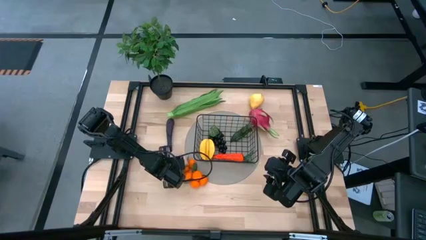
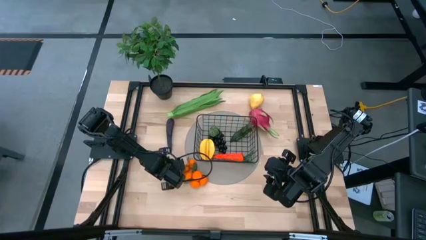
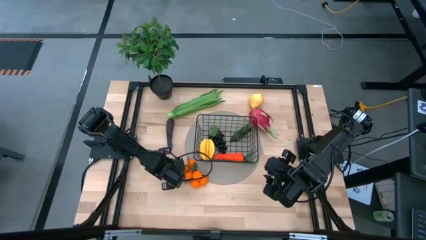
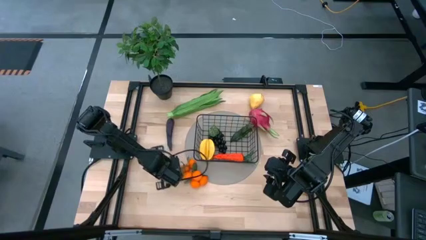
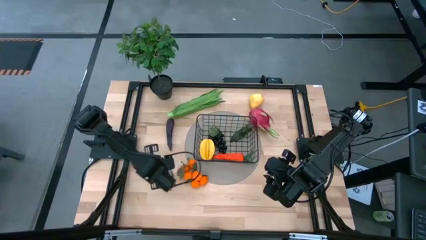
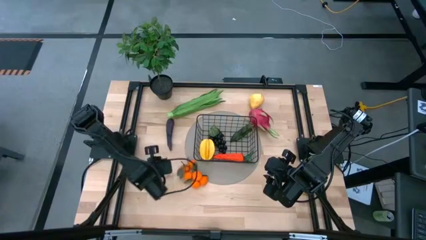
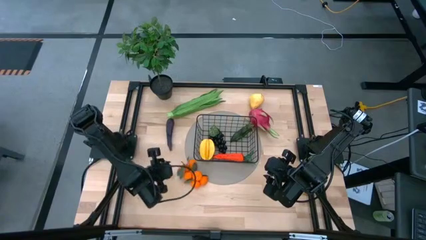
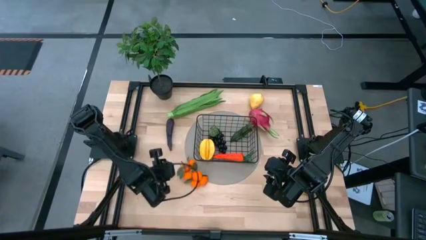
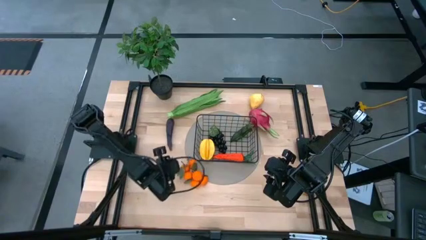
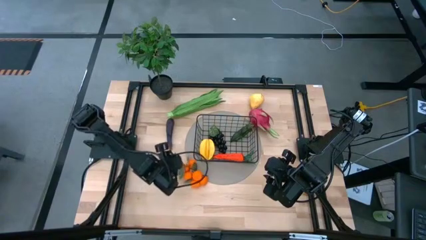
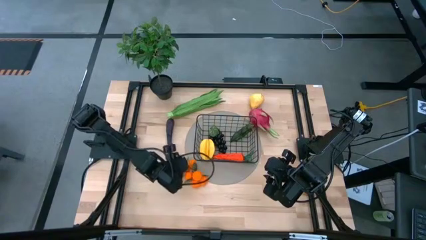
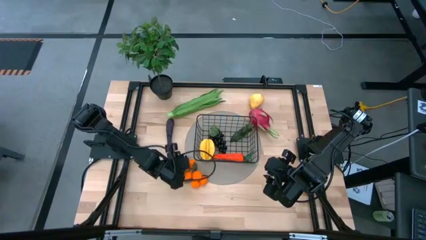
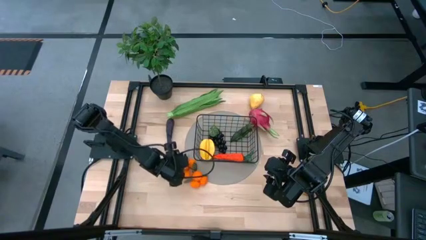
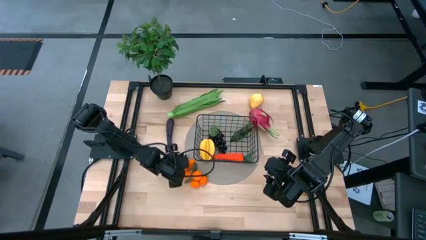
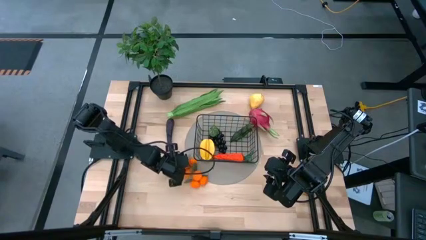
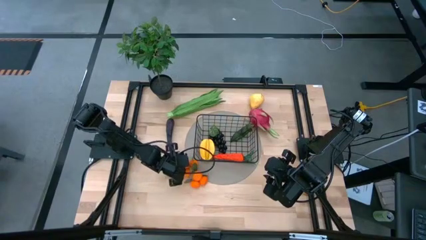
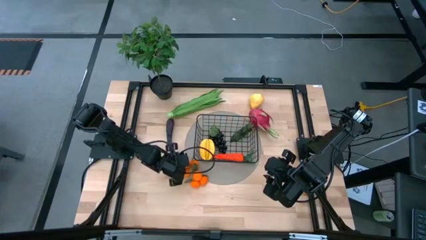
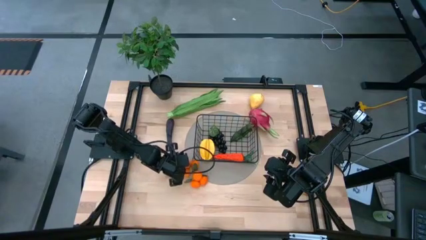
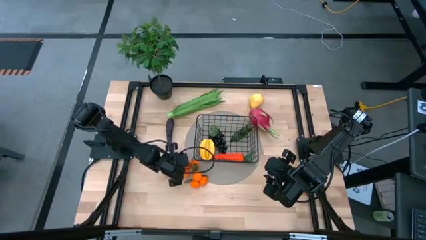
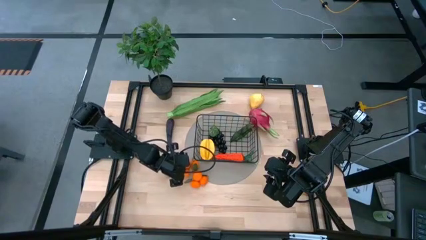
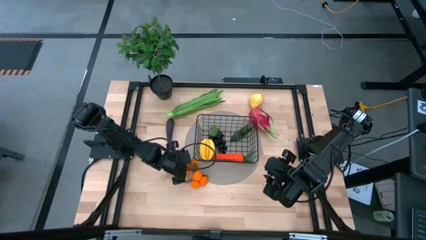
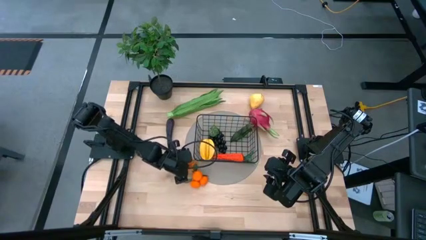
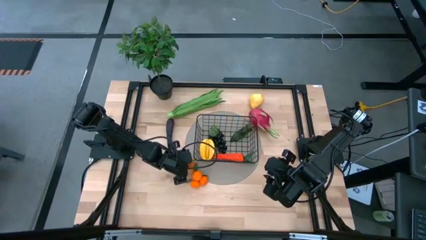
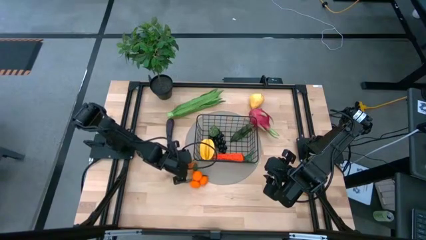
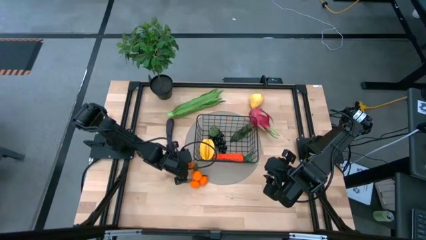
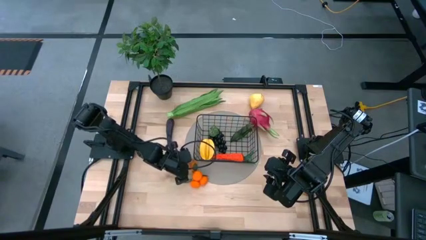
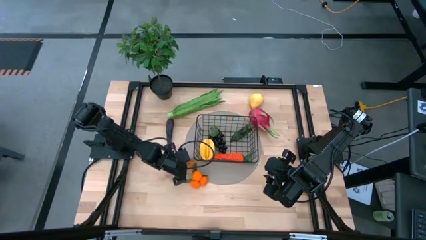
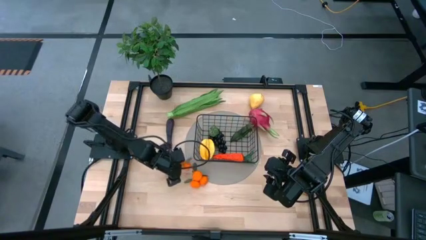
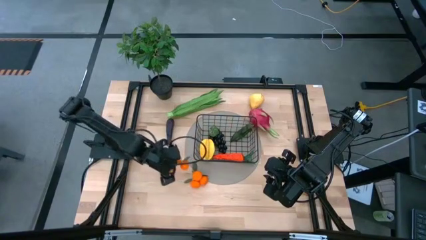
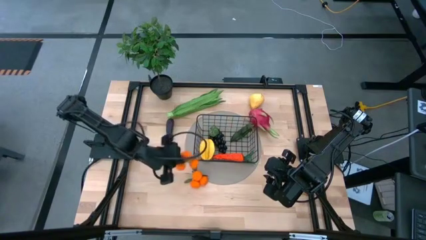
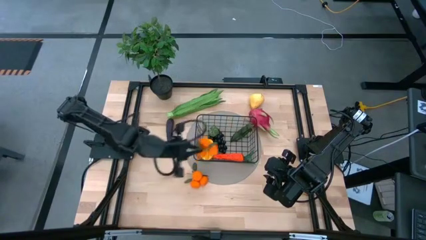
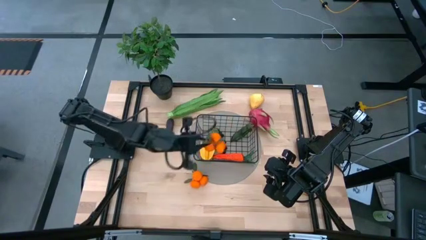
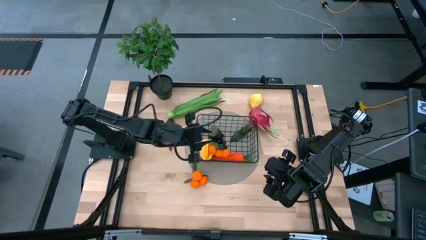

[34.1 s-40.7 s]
Task: Build produce basket
Put the left orange tangerines into the black wire basket

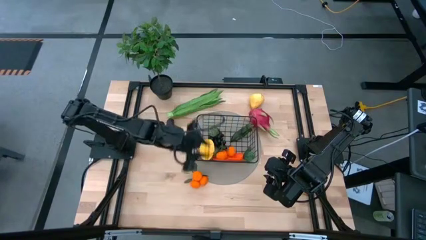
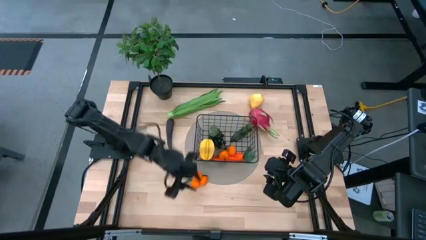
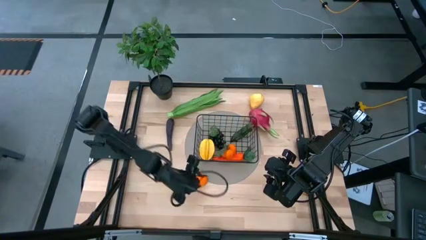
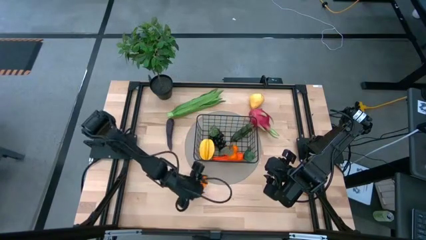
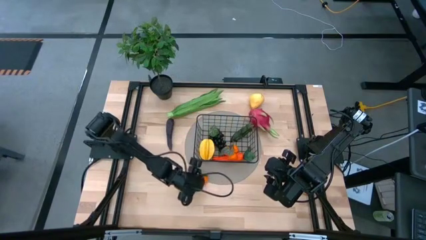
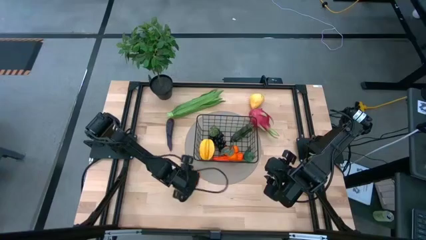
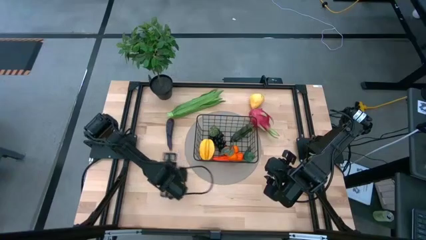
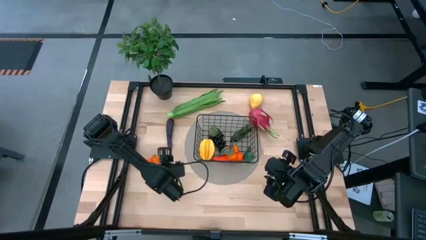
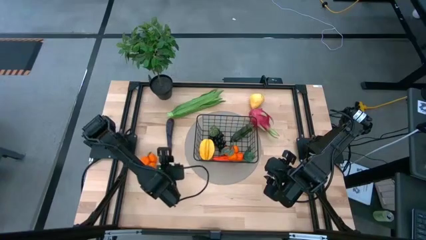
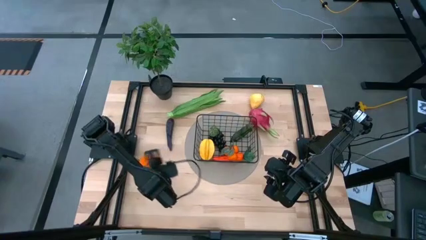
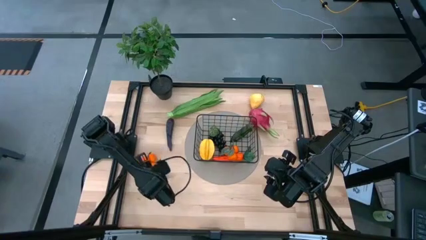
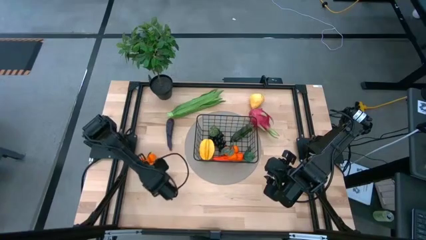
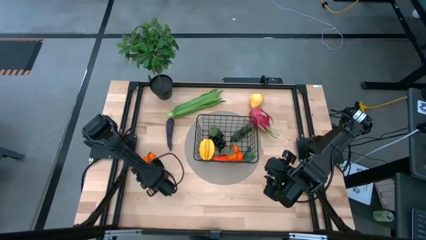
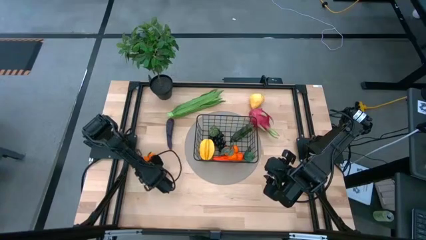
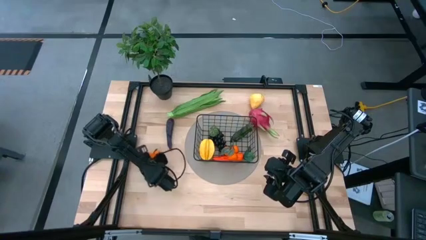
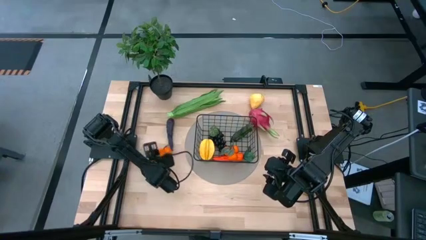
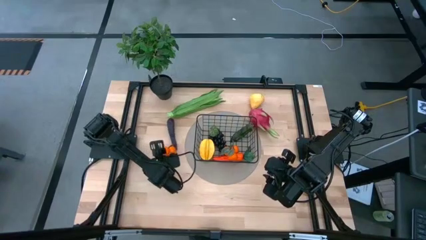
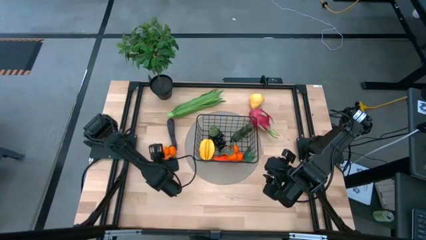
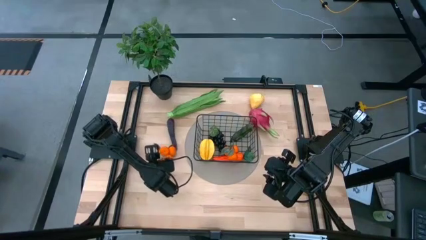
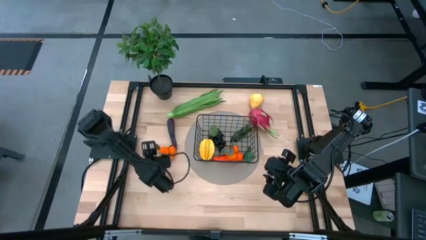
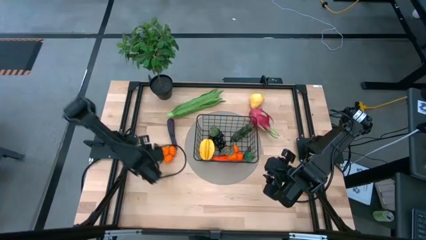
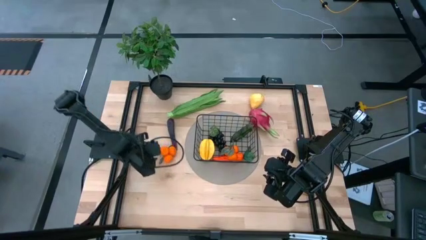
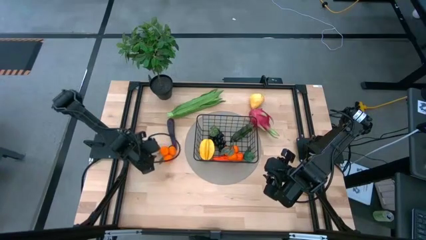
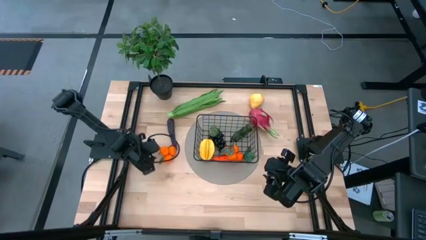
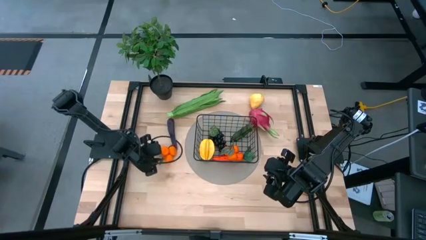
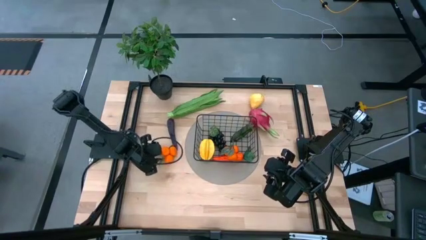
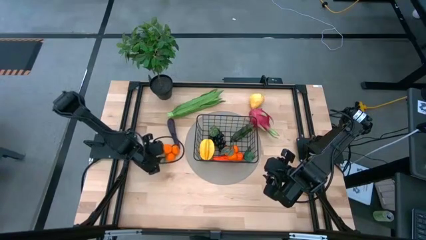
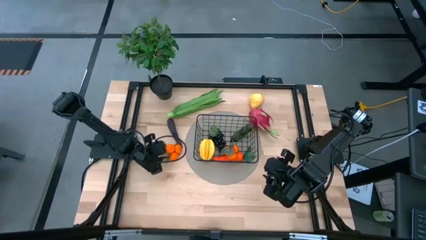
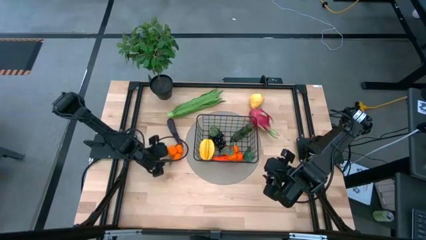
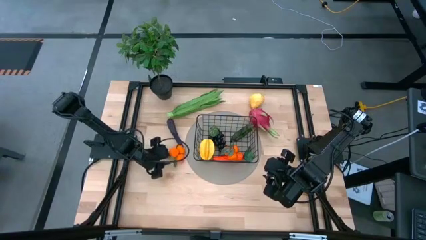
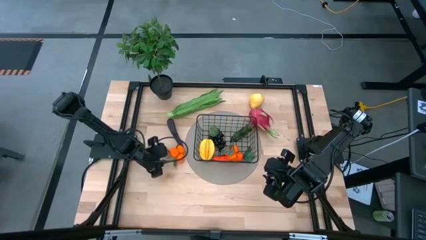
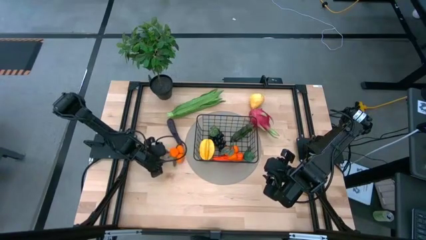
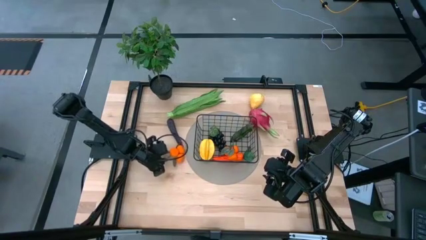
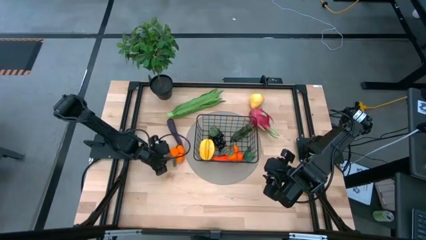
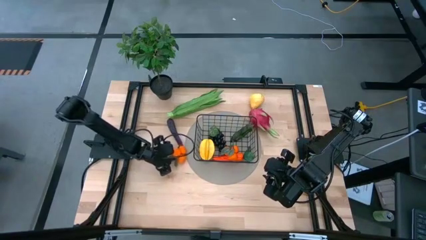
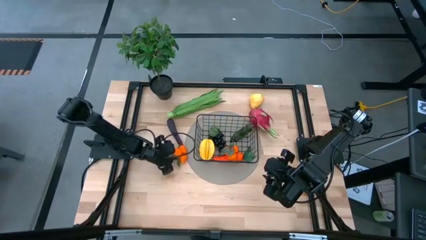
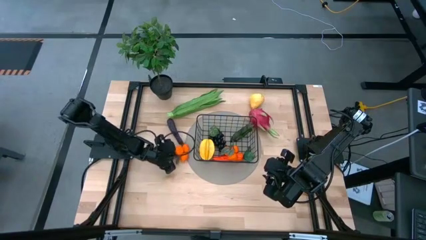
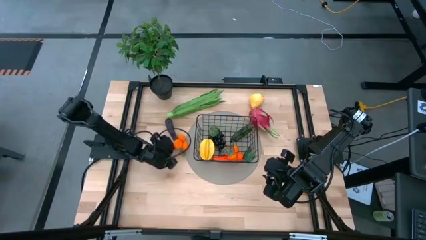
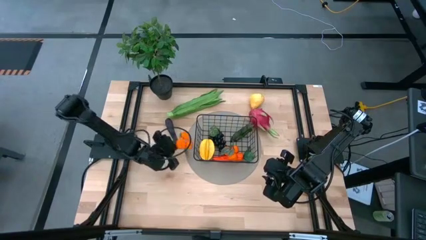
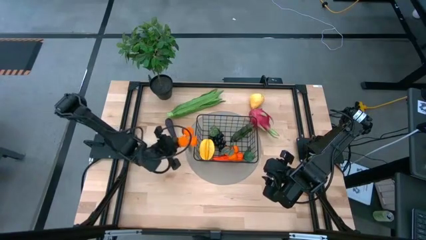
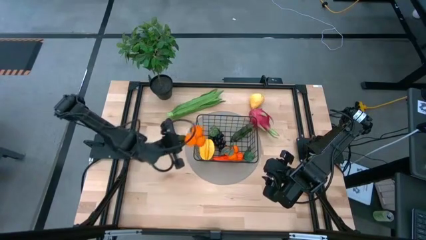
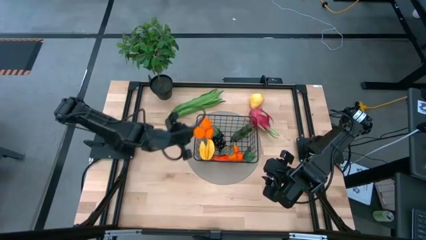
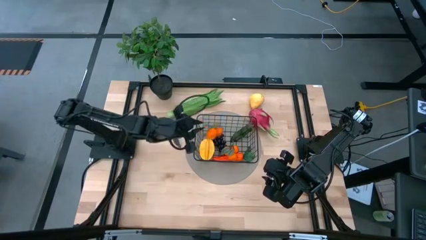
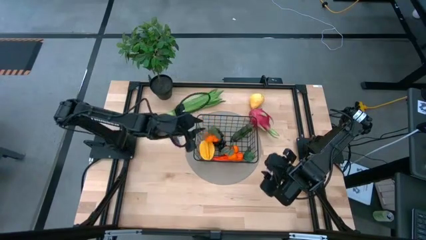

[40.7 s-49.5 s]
Put the orange tangerines into the black wire basket
